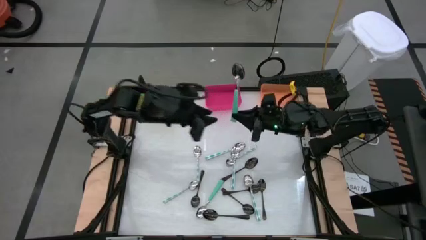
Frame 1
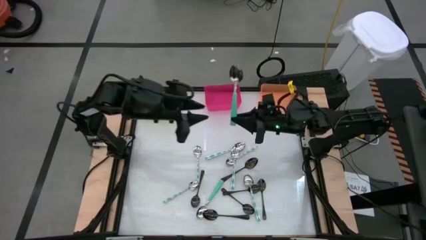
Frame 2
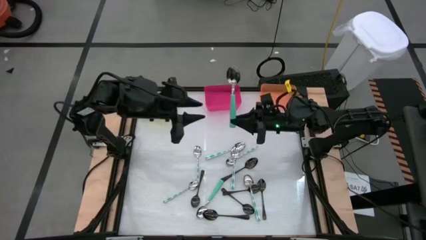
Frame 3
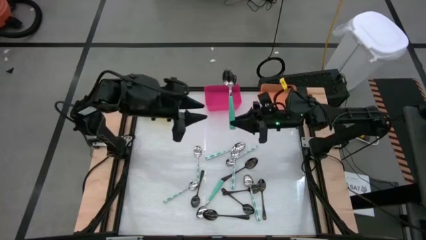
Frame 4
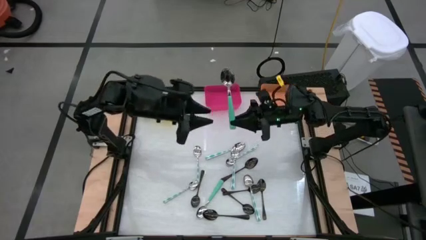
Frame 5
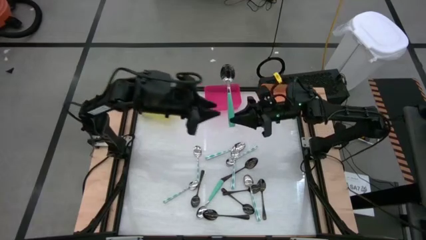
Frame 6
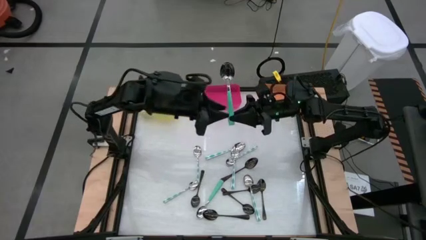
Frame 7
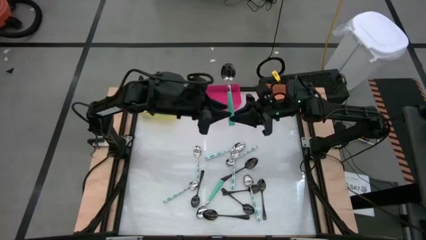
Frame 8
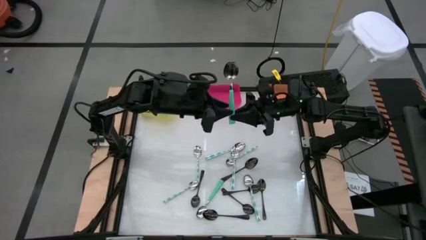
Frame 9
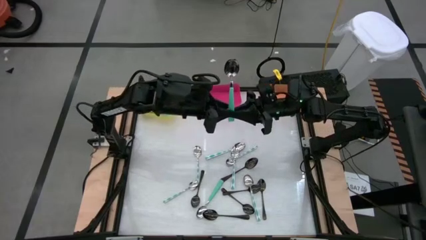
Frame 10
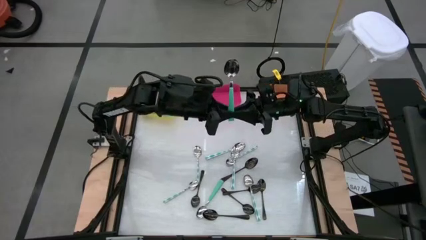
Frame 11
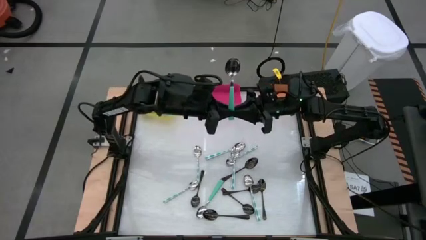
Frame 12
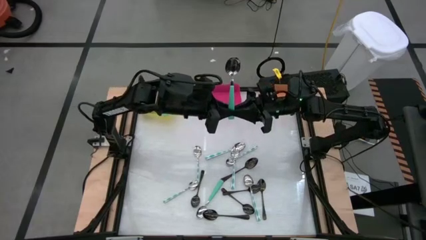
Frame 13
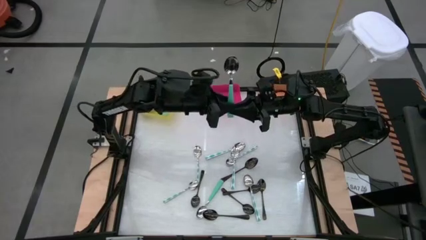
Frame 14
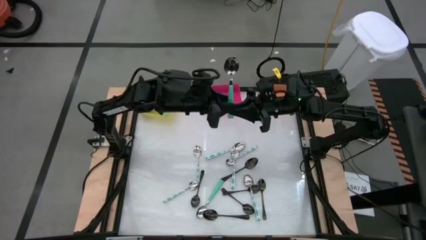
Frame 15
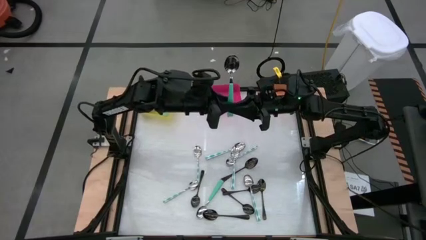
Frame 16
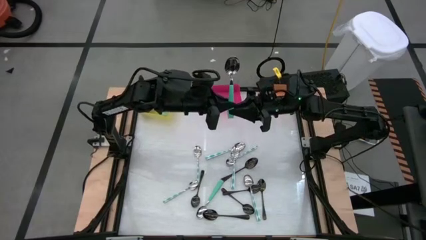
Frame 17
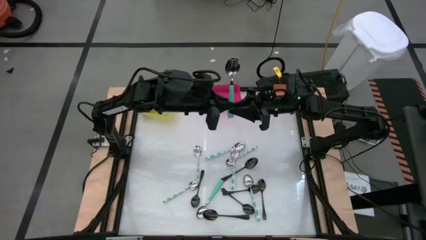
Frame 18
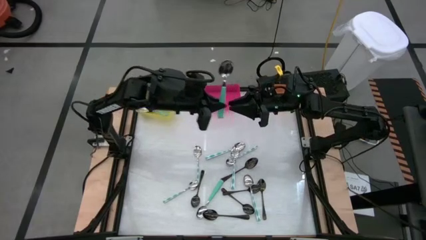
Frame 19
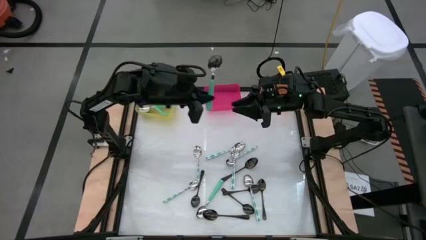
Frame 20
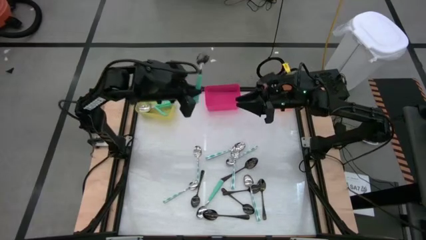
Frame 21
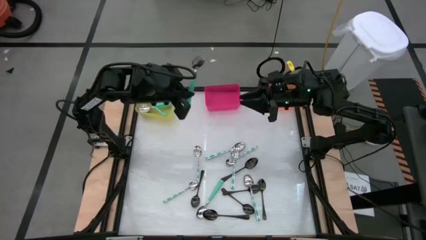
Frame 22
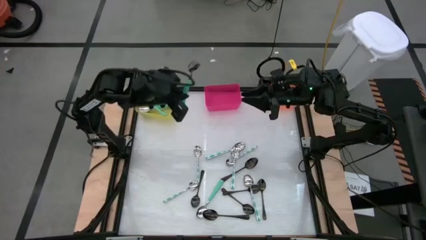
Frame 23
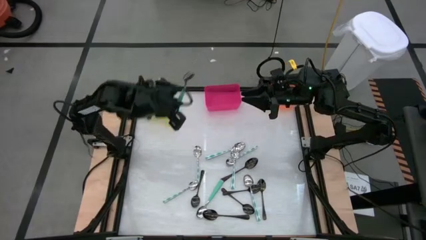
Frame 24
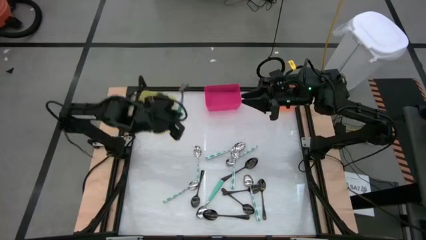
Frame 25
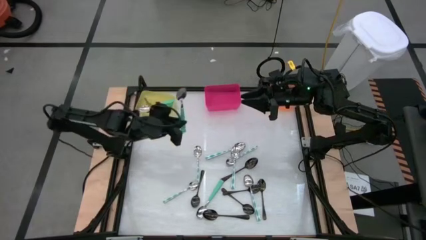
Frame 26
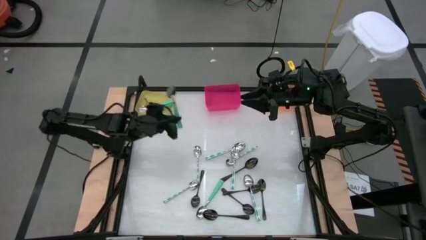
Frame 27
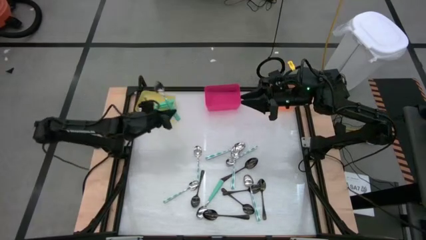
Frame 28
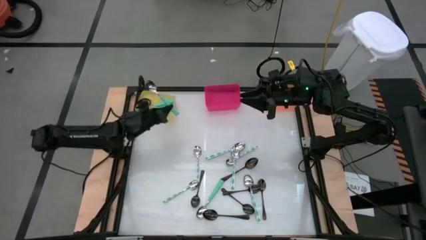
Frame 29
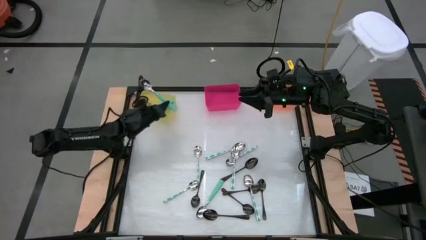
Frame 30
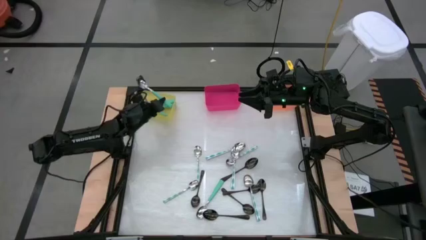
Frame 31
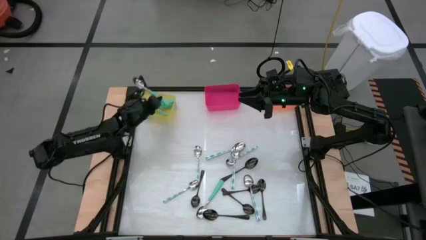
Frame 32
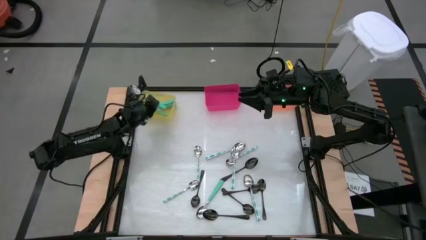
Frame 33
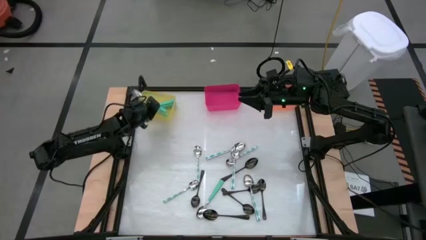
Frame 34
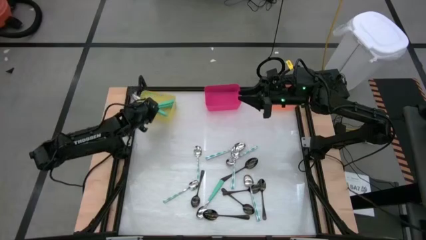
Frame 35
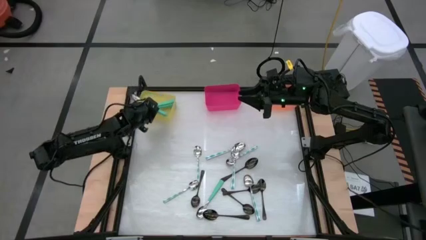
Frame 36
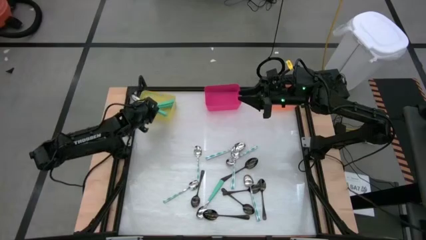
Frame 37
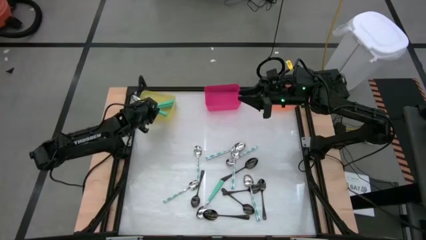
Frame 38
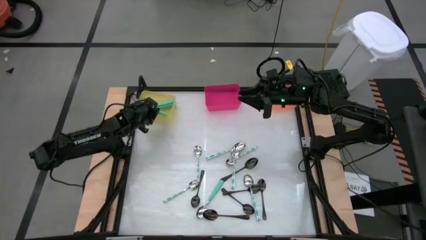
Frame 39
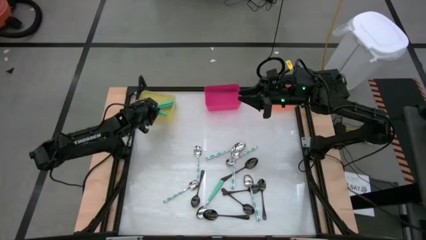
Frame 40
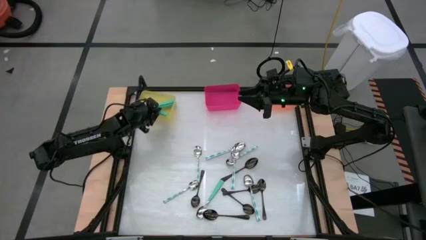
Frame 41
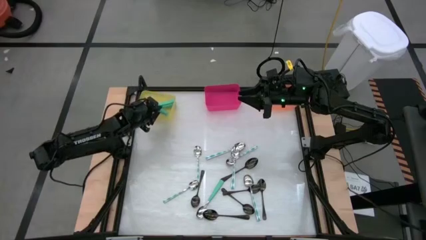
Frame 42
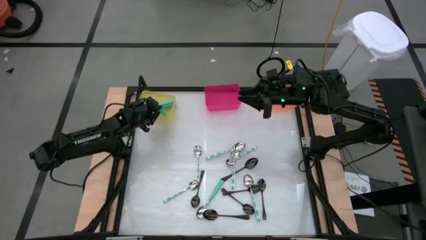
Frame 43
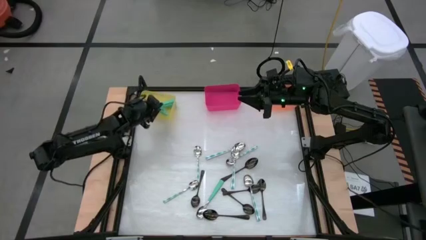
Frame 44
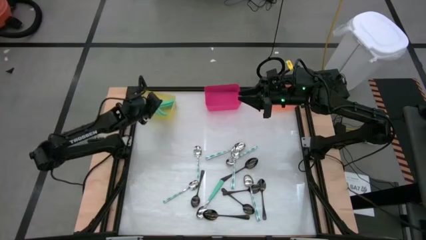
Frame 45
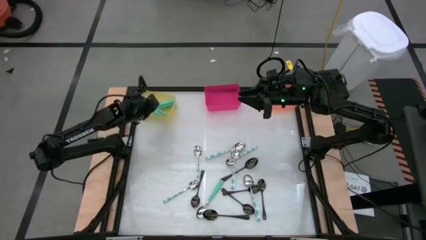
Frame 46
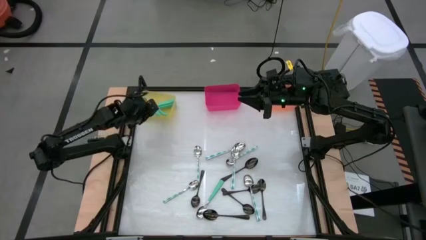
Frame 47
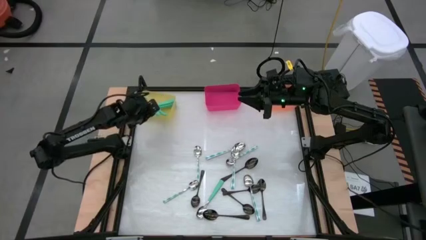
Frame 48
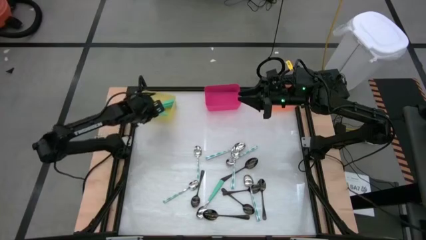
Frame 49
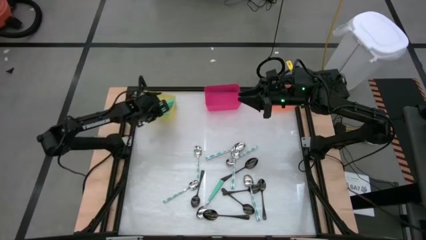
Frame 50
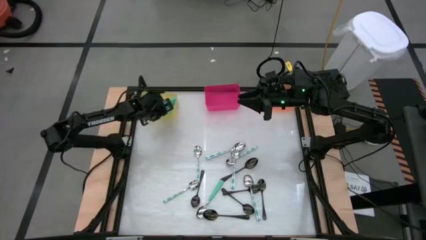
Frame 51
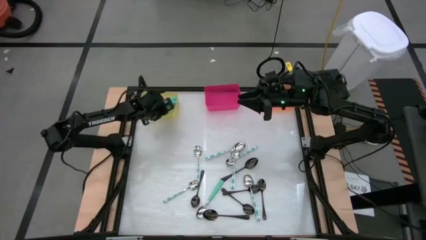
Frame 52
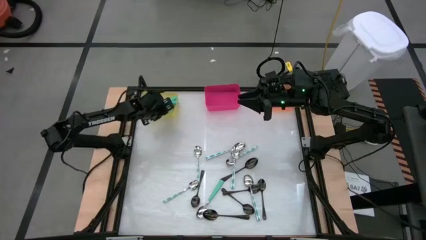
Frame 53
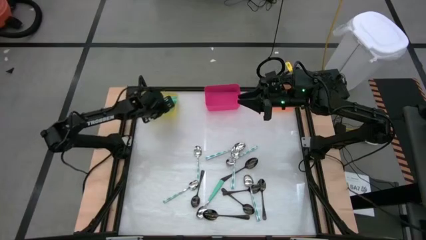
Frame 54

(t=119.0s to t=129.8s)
Task: Sort silverware by color (type)
Put the light green spoon into the yellow bin
